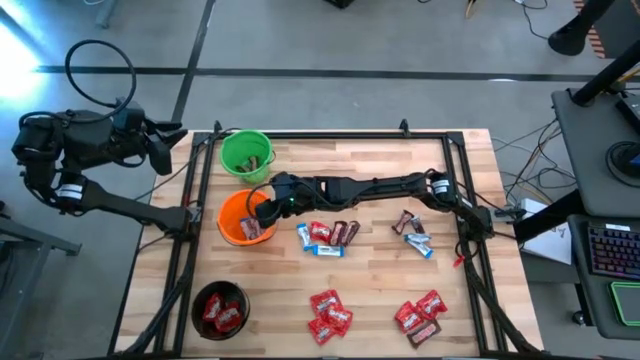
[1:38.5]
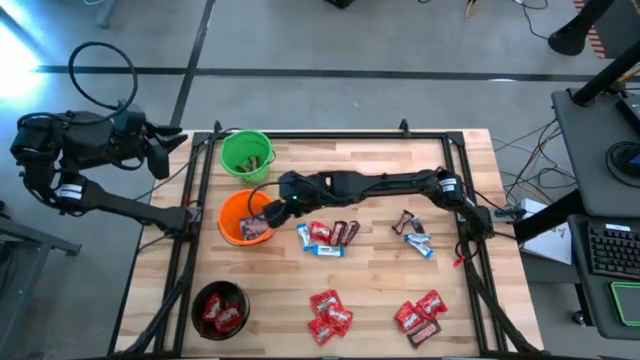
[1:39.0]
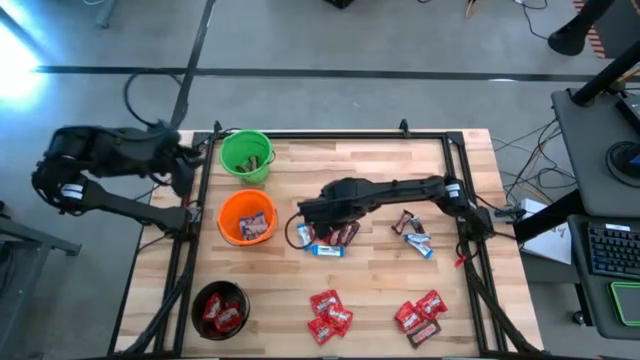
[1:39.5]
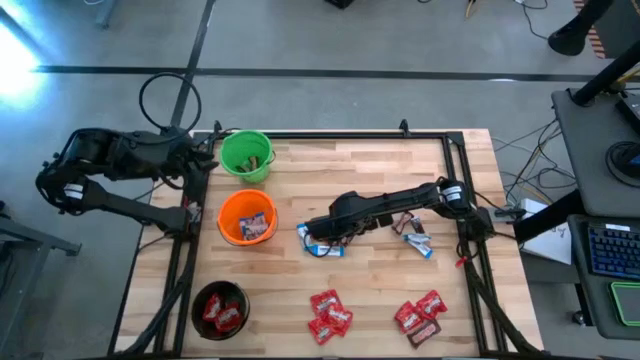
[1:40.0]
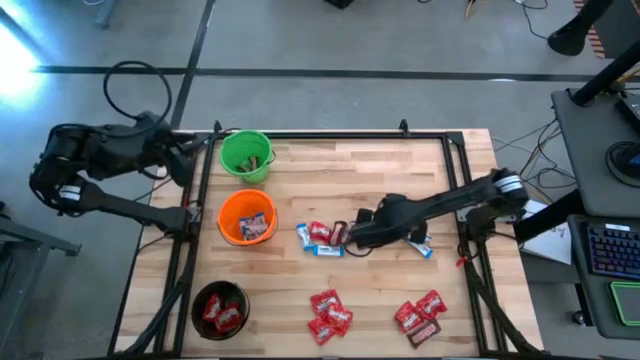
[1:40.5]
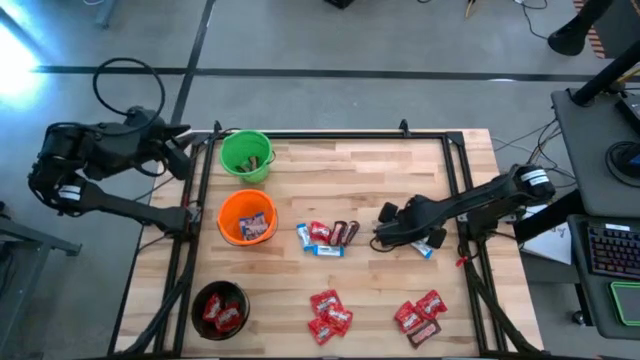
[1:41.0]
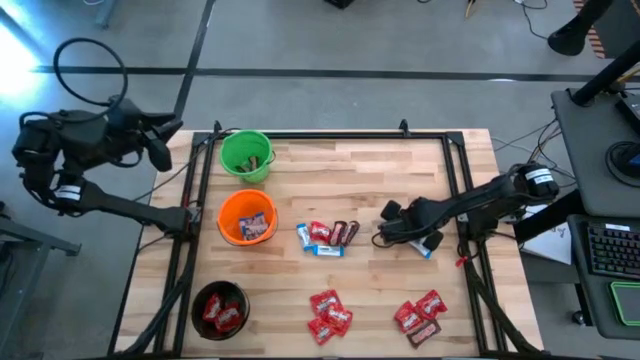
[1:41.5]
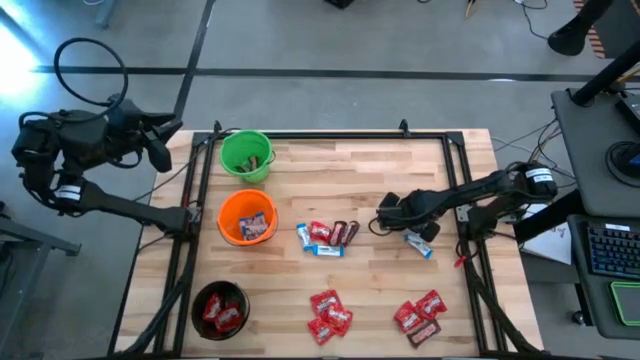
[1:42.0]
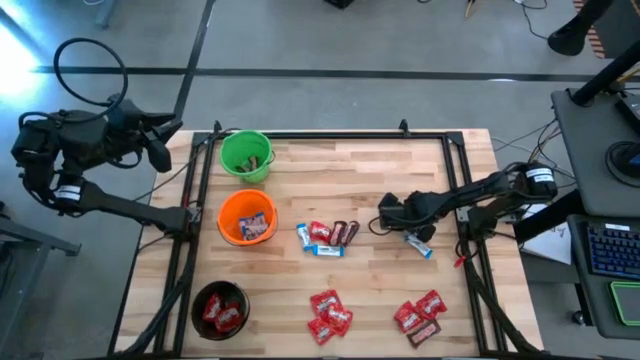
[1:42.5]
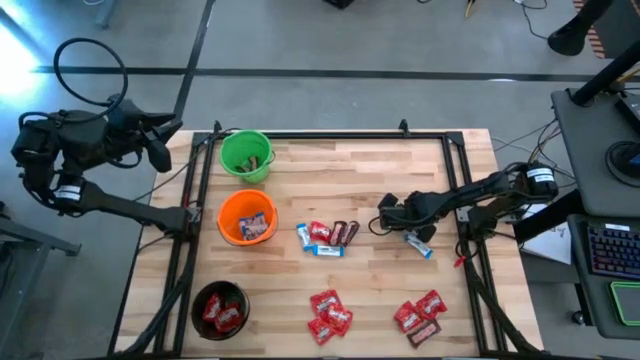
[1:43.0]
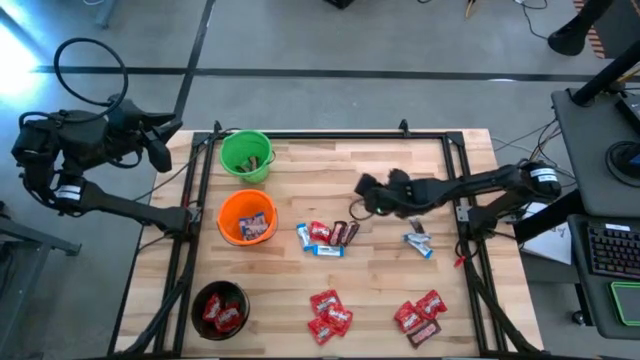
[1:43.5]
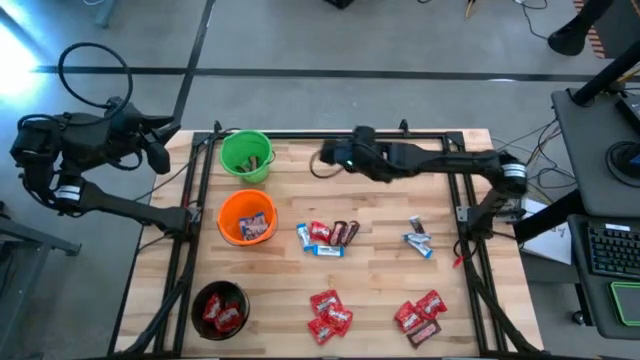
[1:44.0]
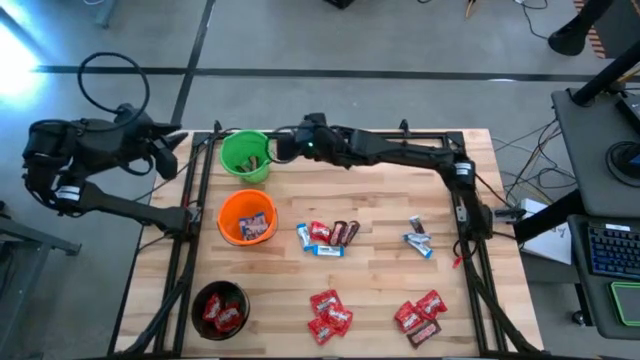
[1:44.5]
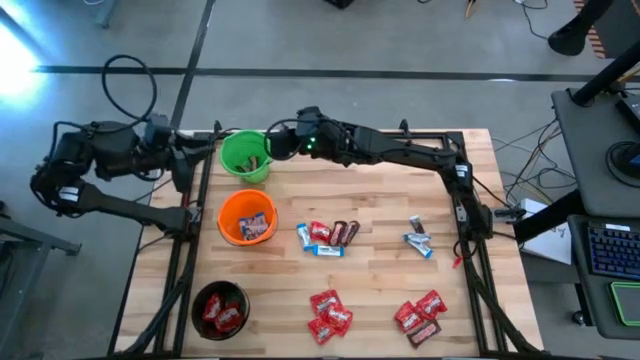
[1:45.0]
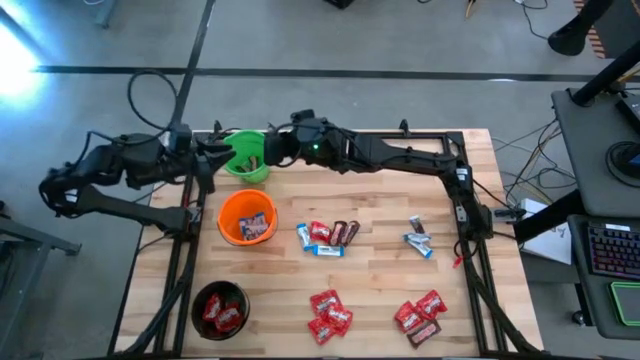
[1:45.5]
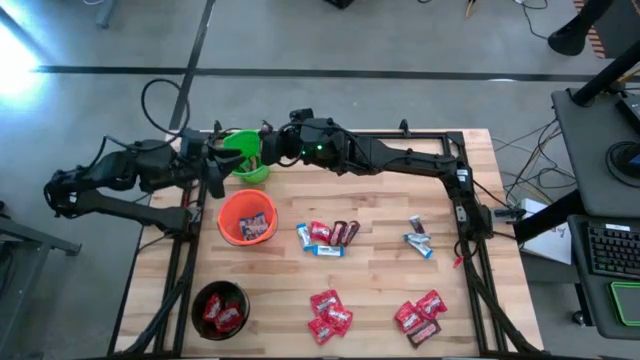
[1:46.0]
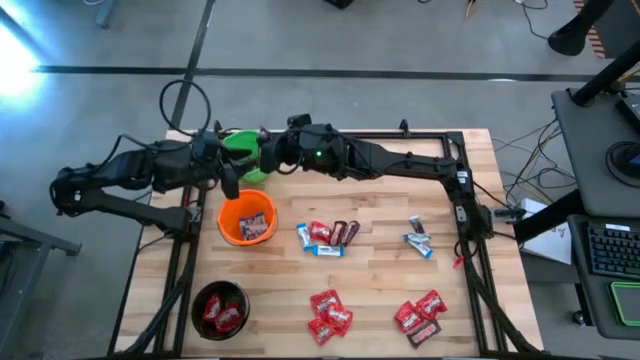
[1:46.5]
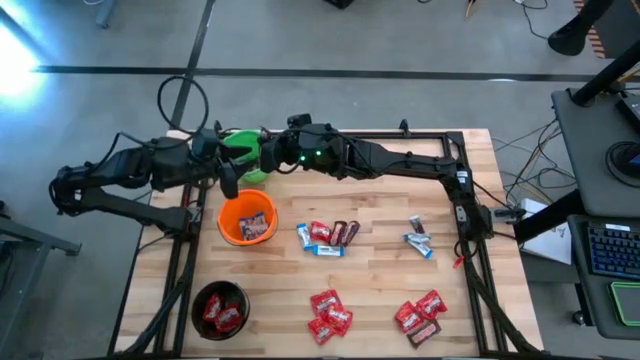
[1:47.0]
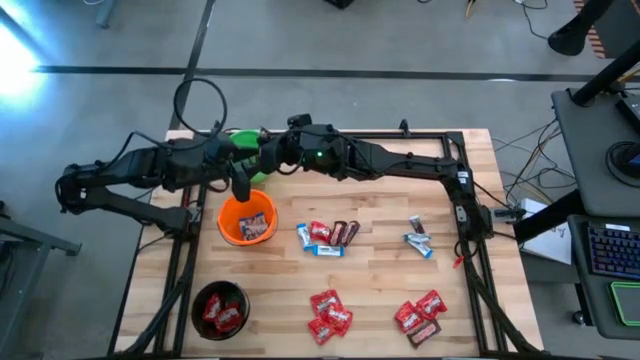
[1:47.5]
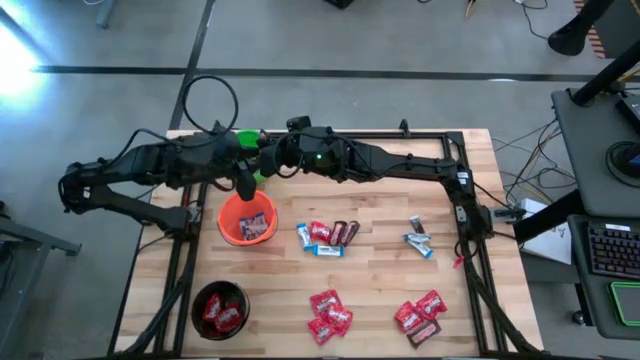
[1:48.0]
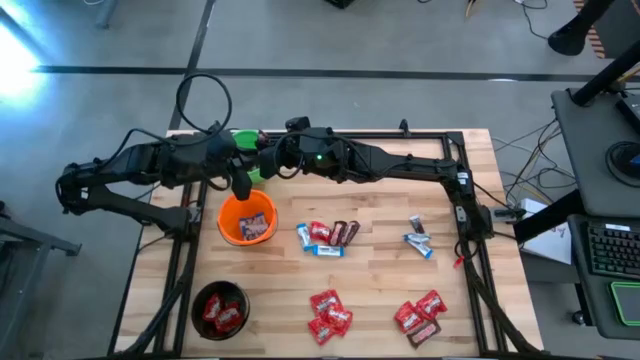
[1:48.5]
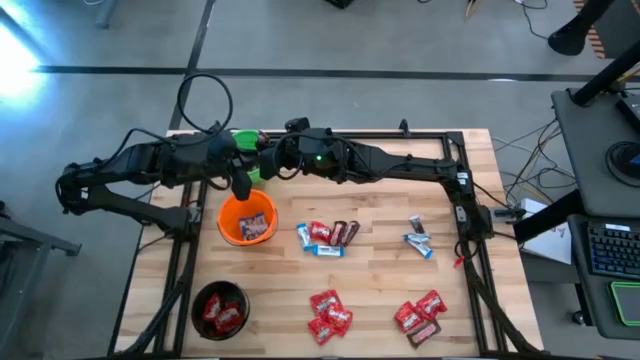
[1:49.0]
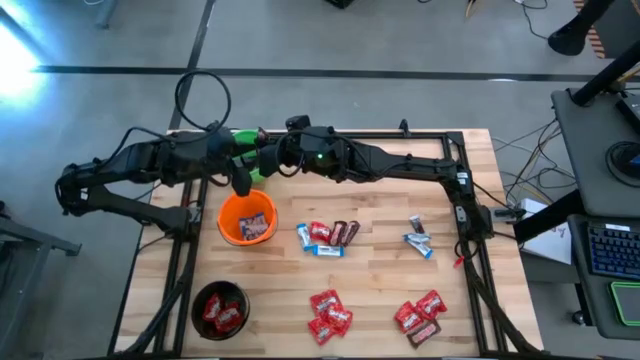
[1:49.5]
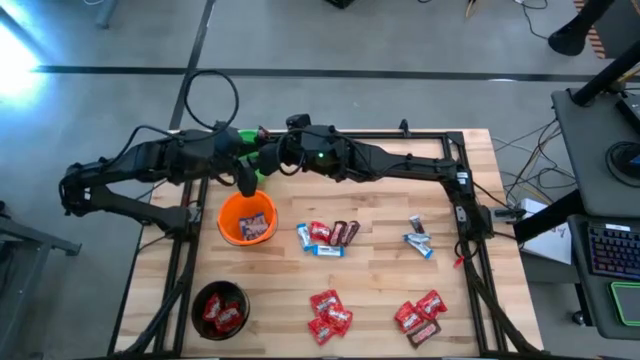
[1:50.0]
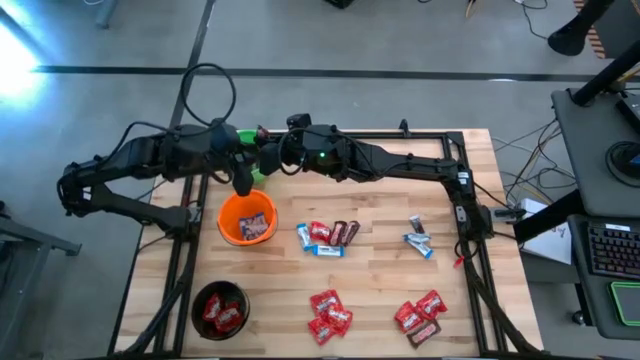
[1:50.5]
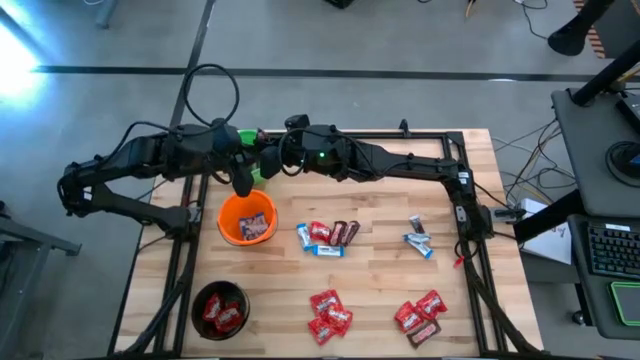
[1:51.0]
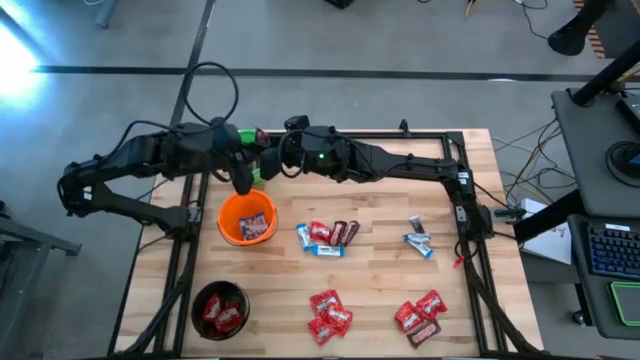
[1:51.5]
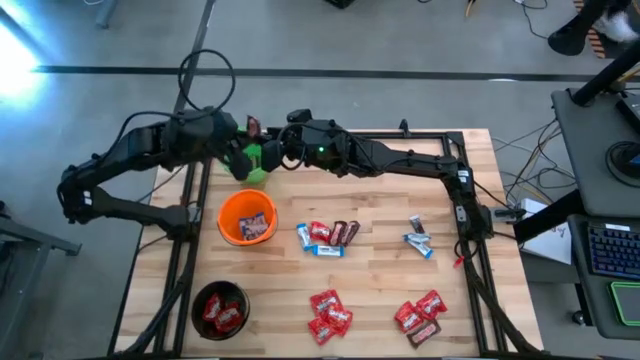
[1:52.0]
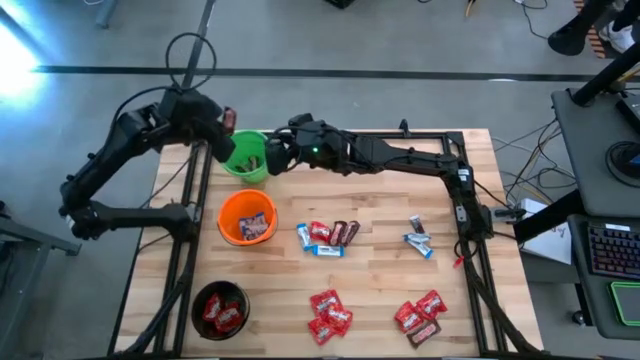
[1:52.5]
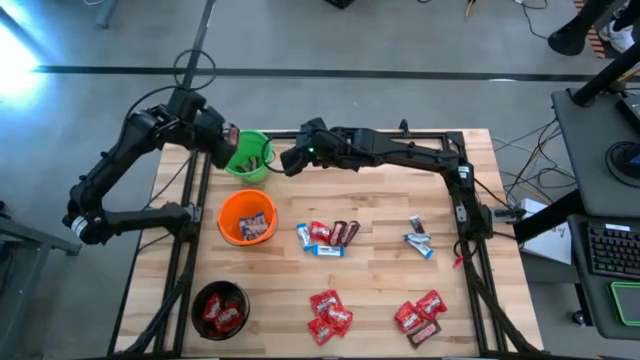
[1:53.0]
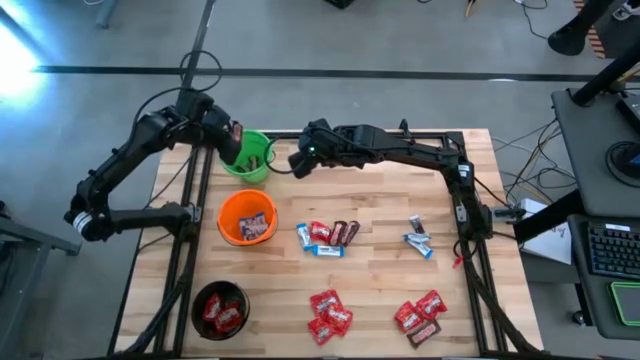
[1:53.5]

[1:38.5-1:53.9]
Task: Organize candy in baskets
Put the brown chocolate into the green bucket

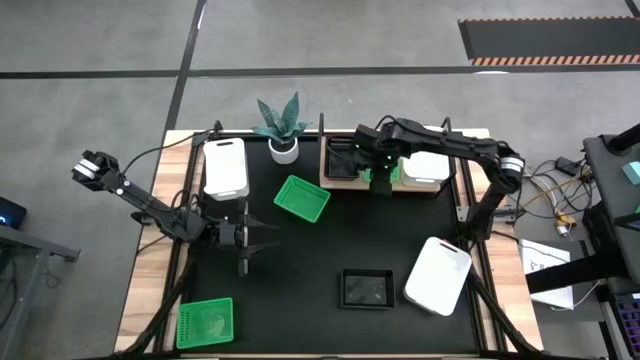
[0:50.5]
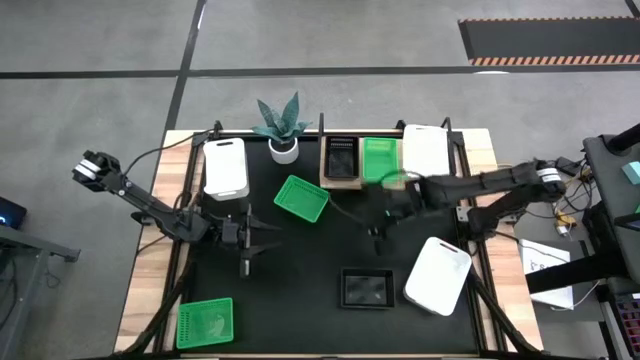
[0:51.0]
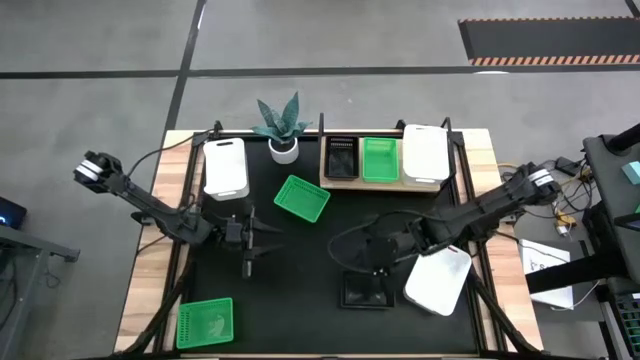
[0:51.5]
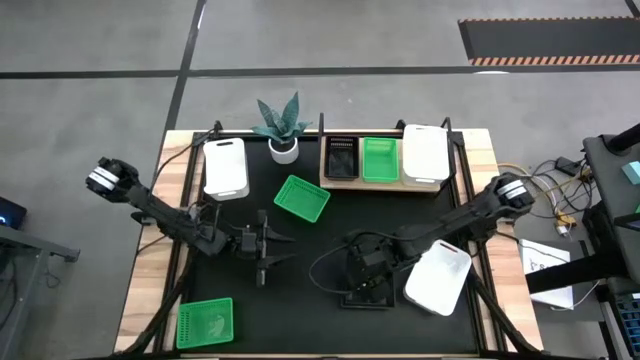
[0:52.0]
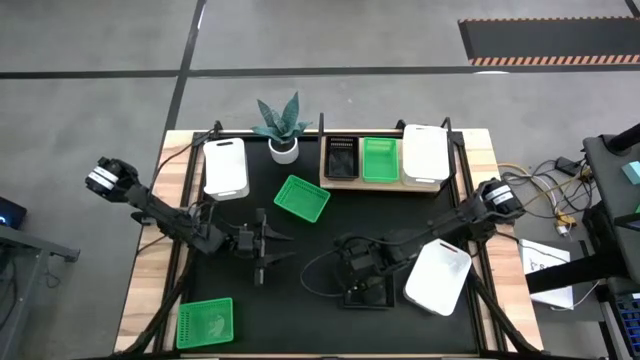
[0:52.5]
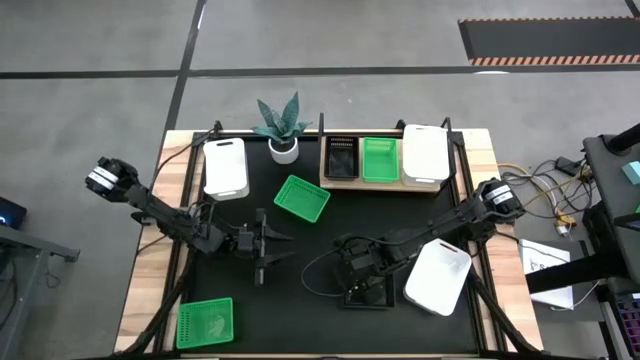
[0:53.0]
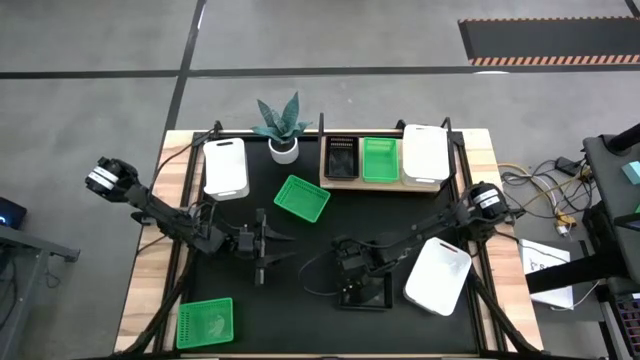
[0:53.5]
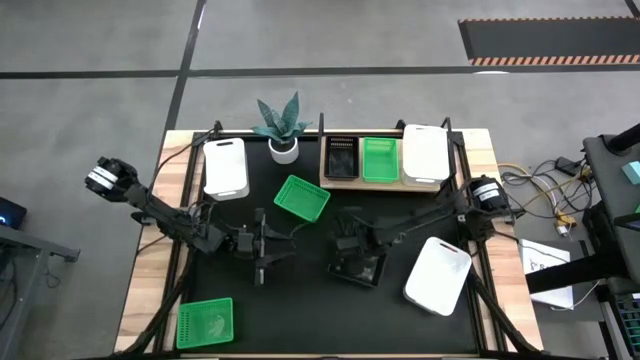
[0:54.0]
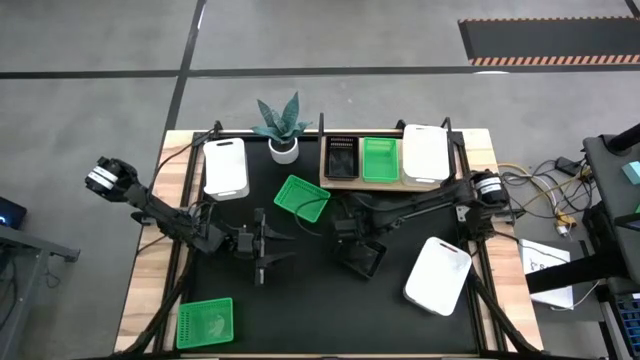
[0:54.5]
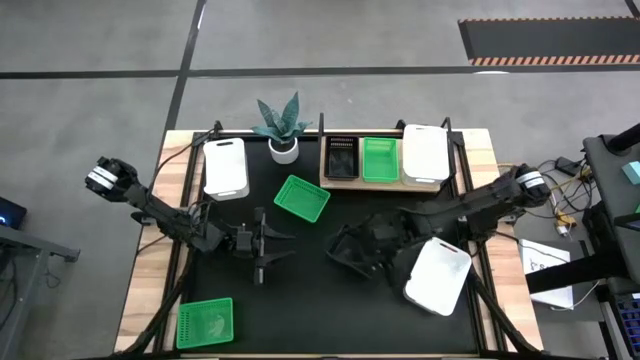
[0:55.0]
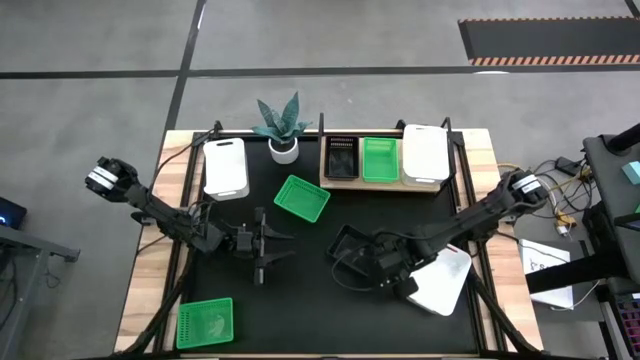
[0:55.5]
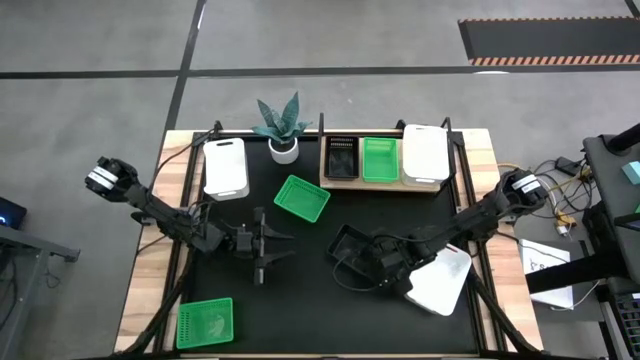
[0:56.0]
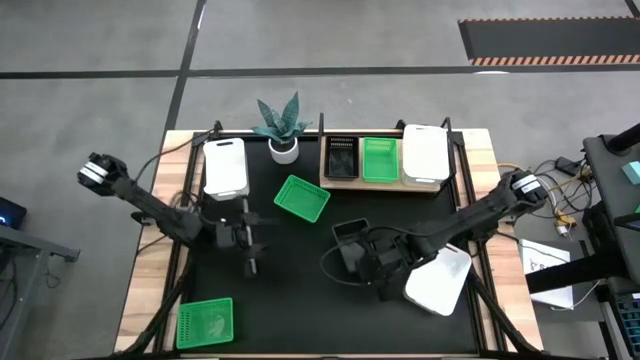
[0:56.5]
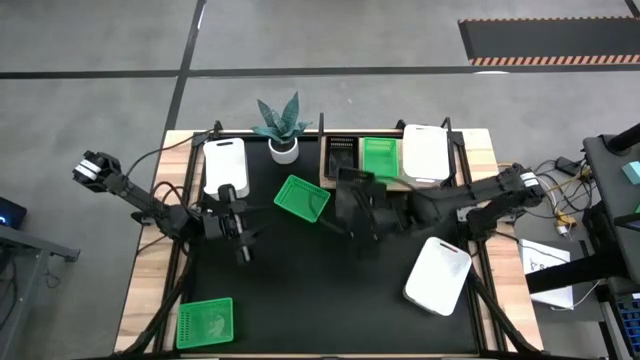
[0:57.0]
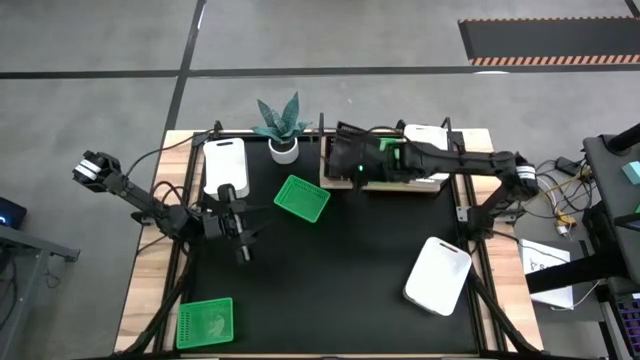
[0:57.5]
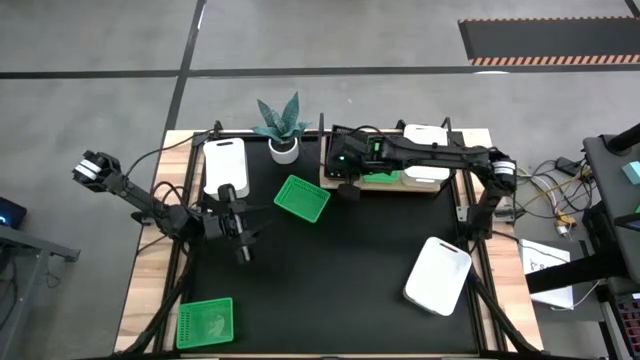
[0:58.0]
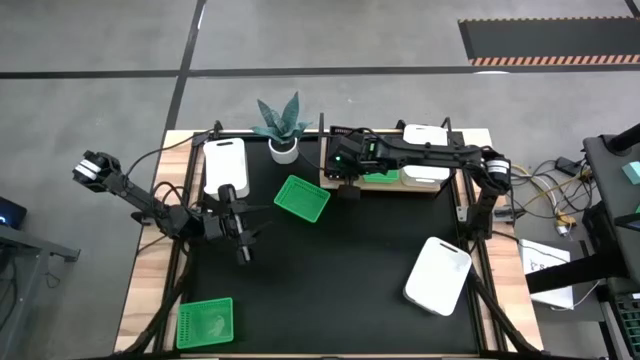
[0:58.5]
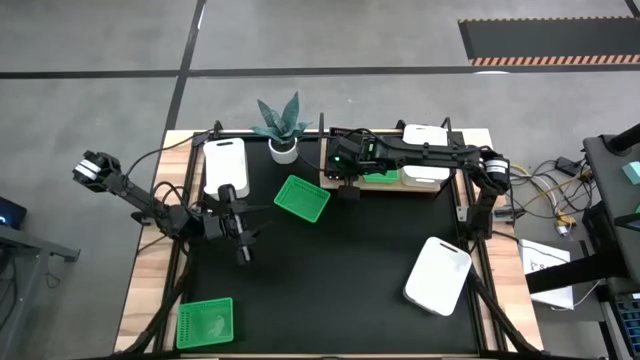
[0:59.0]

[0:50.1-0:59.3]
Task: Stack baskets on shelf by color
Stack the black bin on the black bin on the shelf
